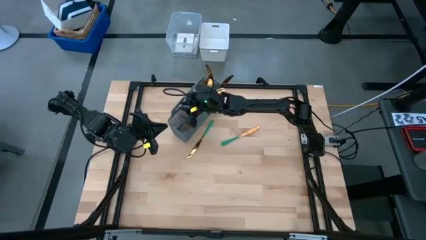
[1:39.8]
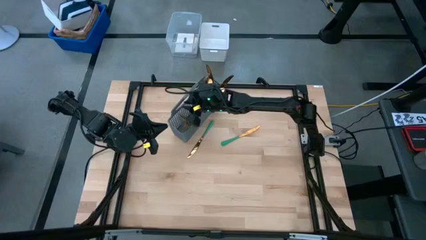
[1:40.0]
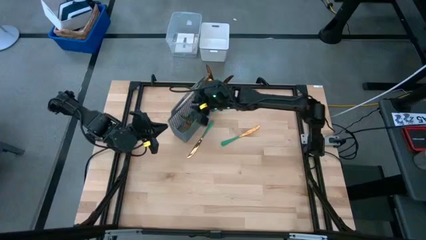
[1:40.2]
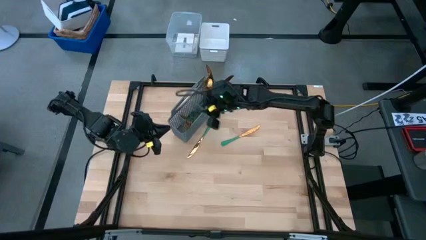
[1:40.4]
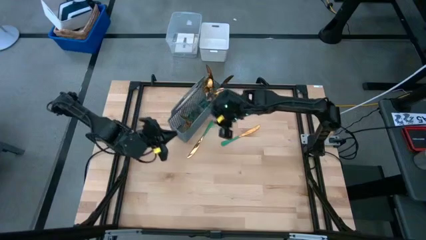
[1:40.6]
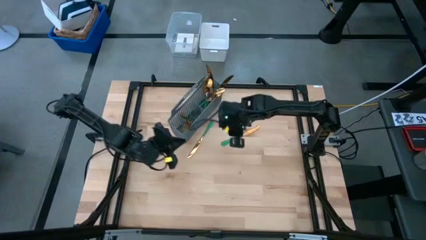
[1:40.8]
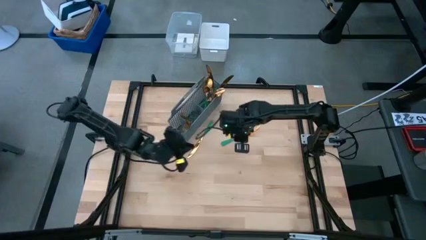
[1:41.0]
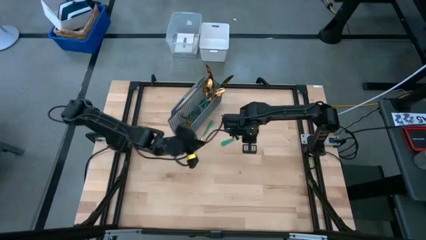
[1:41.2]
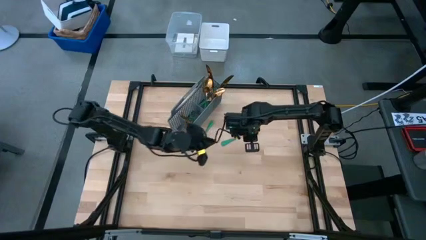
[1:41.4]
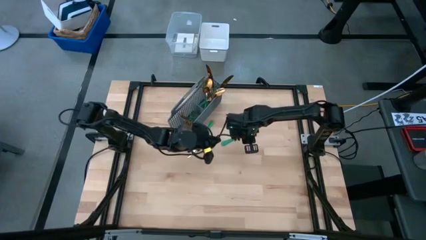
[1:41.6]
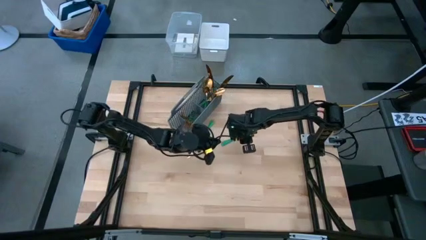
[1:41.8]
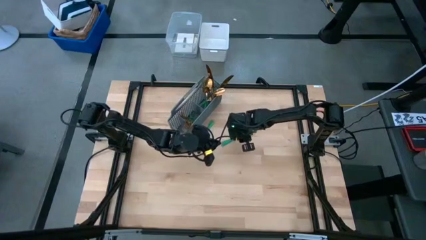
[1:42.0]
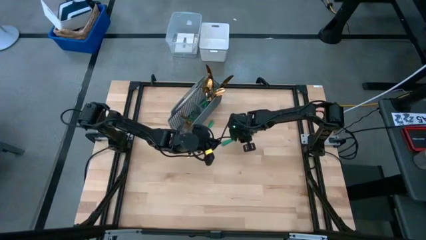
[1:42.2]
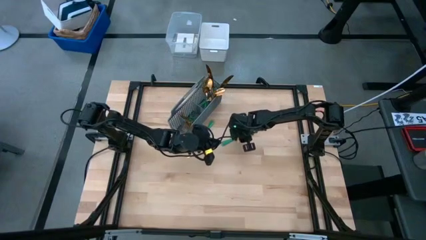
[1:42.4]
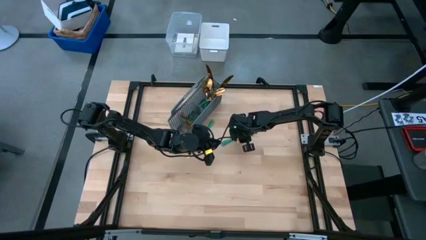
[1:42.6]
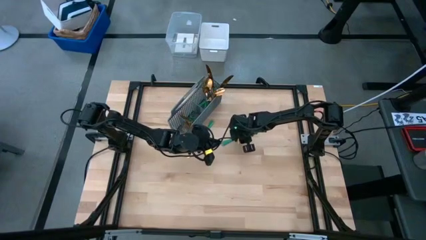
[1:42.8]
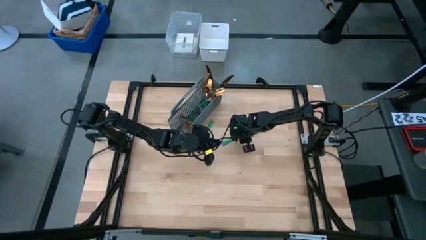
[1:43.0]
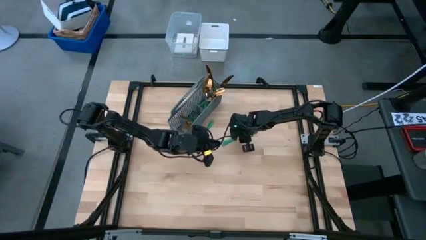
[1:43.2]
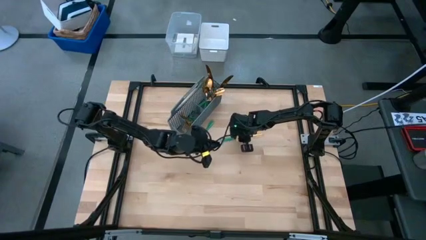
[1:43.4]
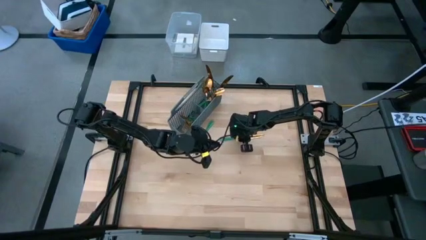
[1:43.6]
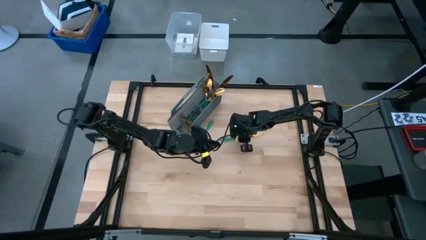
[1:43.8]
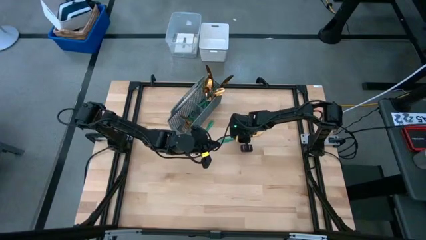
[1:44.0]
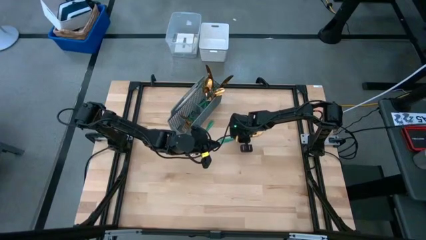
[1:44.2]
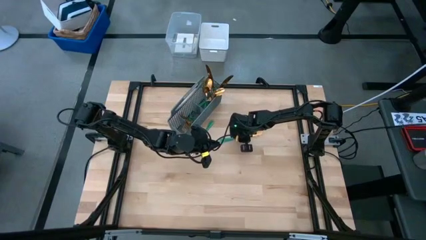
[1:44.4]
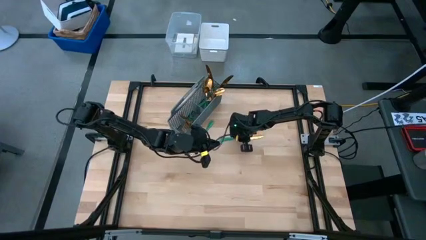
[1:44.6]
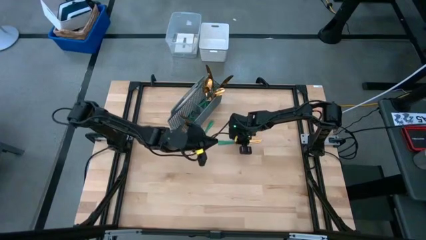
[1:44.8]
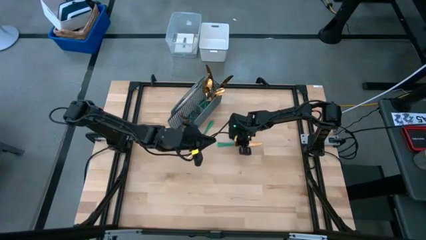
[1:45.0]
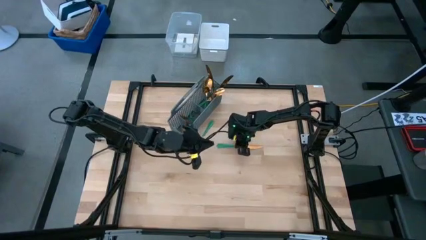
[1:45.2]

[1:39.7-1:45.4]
Task: Sort silverware
Put the right green-gold table knife into the silverware basket

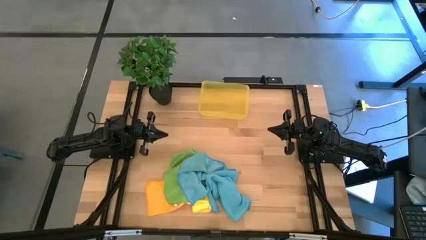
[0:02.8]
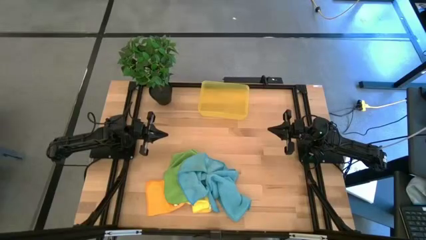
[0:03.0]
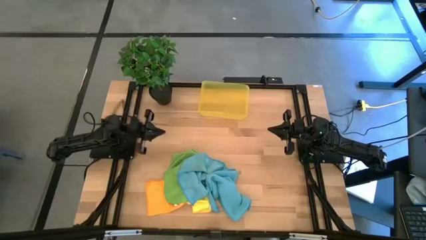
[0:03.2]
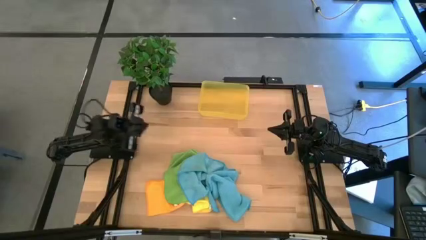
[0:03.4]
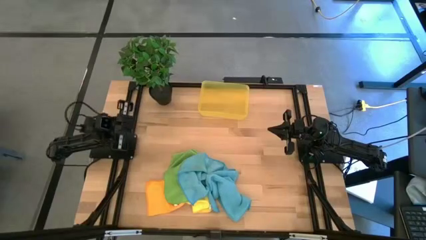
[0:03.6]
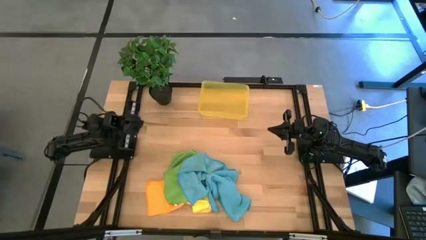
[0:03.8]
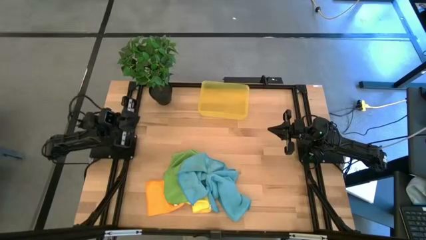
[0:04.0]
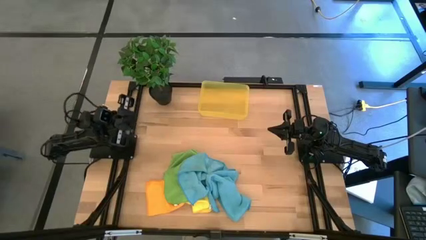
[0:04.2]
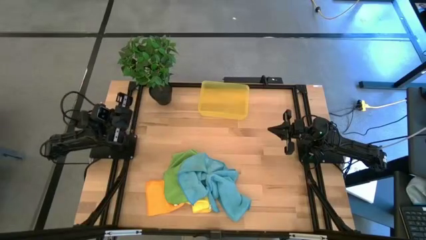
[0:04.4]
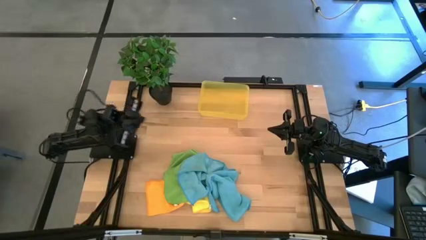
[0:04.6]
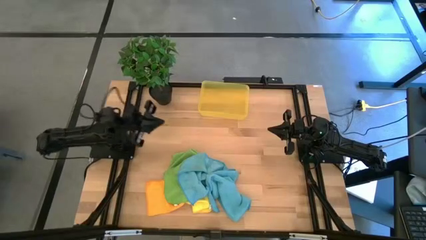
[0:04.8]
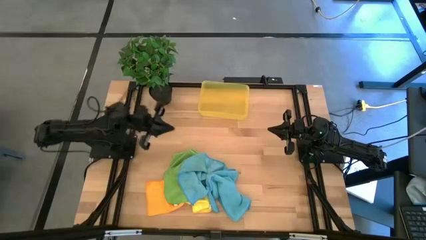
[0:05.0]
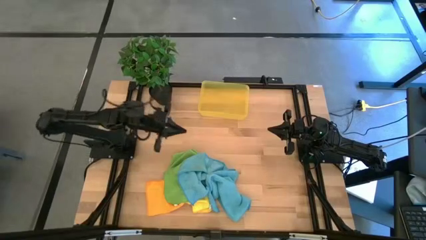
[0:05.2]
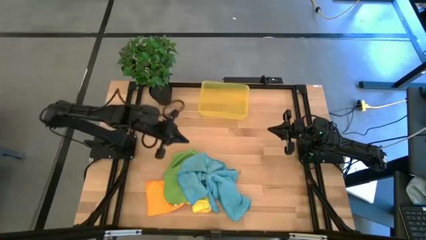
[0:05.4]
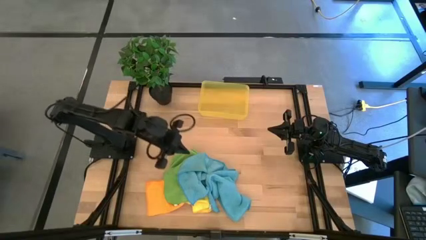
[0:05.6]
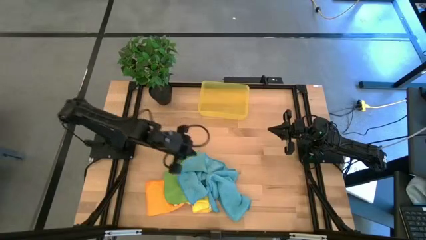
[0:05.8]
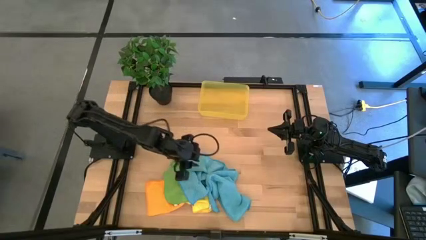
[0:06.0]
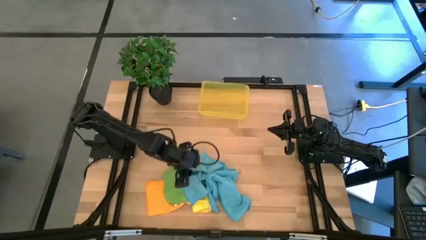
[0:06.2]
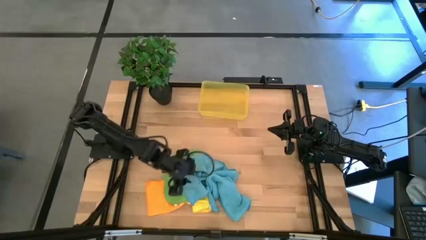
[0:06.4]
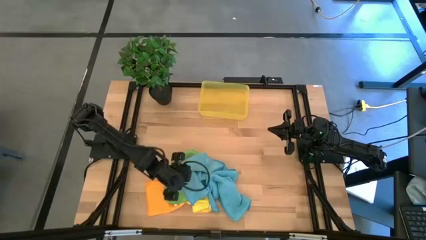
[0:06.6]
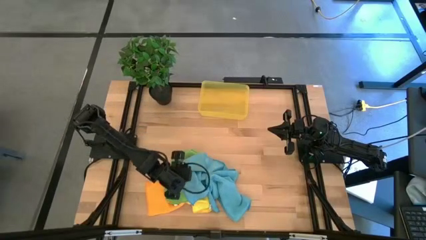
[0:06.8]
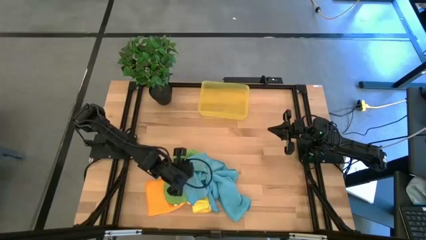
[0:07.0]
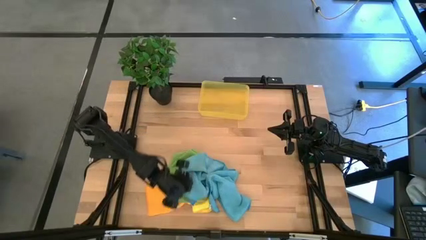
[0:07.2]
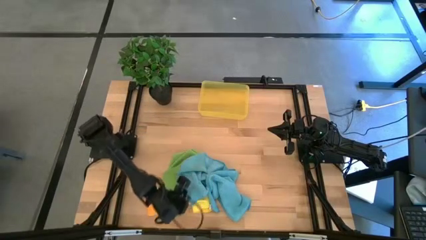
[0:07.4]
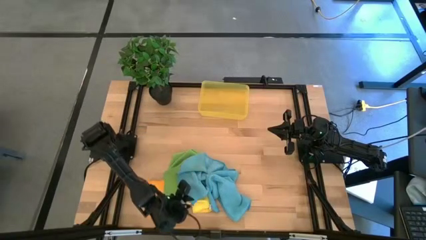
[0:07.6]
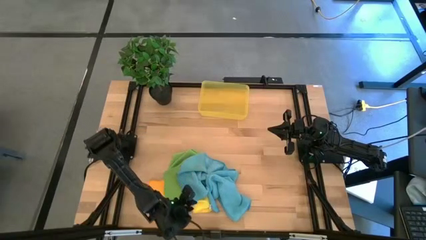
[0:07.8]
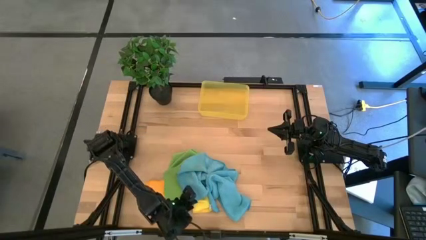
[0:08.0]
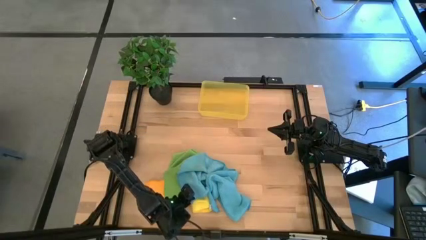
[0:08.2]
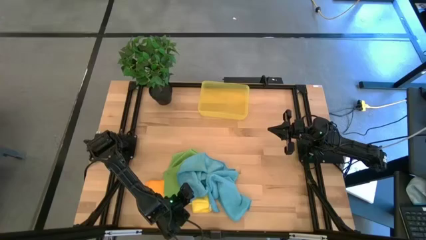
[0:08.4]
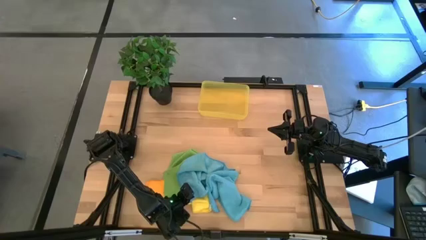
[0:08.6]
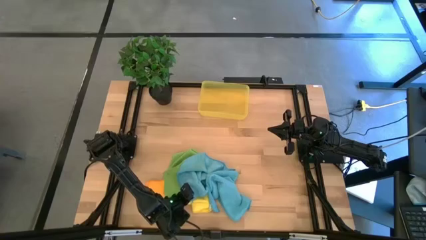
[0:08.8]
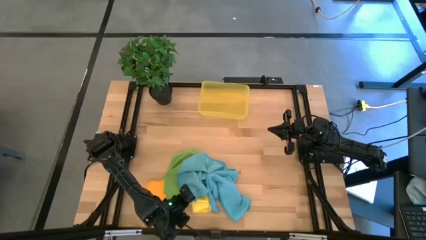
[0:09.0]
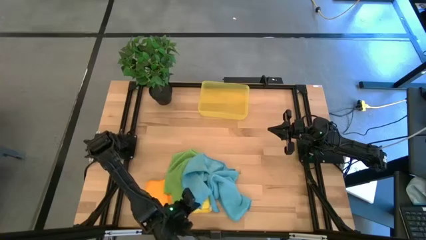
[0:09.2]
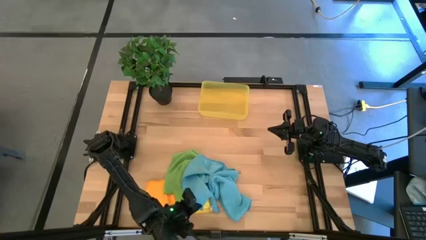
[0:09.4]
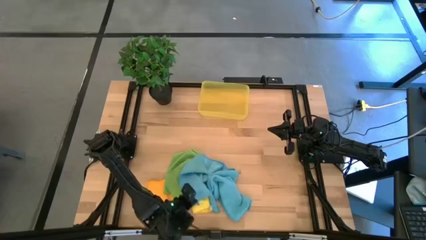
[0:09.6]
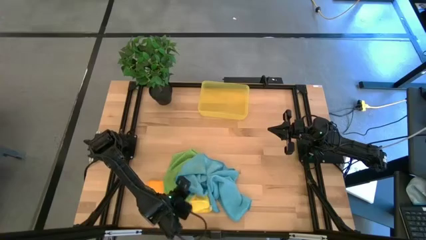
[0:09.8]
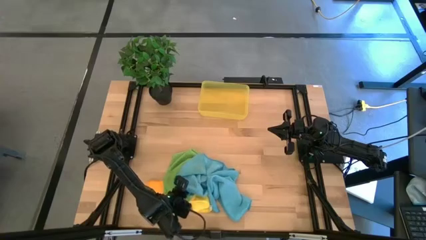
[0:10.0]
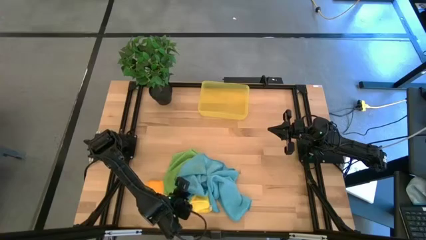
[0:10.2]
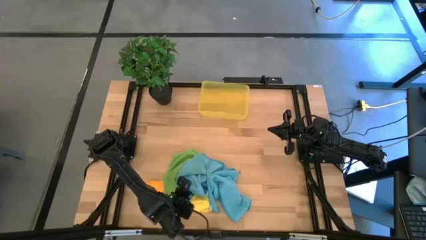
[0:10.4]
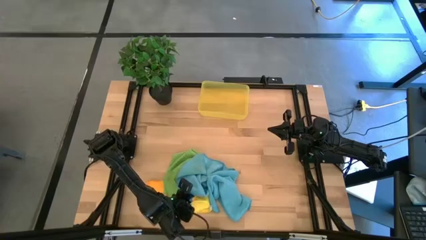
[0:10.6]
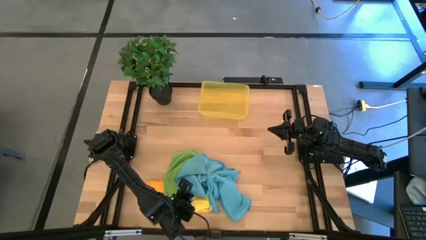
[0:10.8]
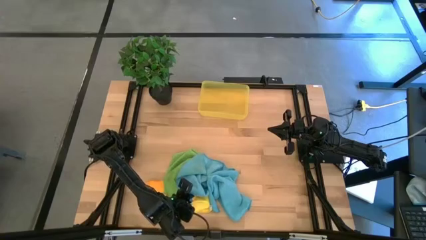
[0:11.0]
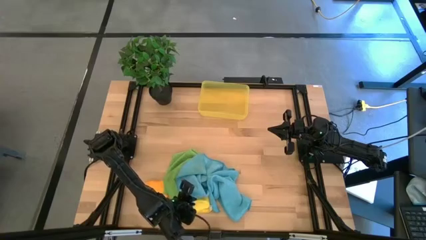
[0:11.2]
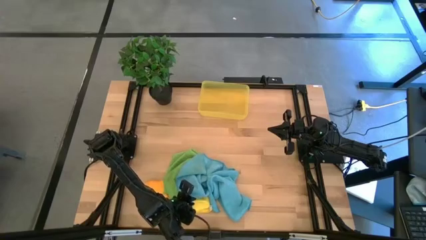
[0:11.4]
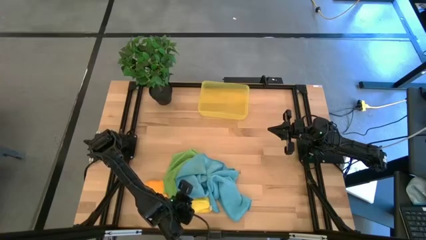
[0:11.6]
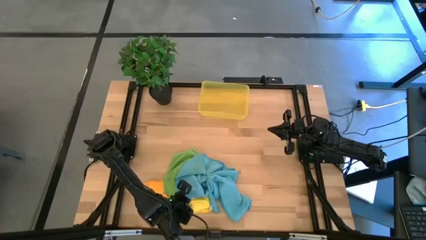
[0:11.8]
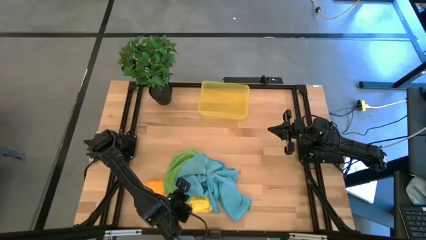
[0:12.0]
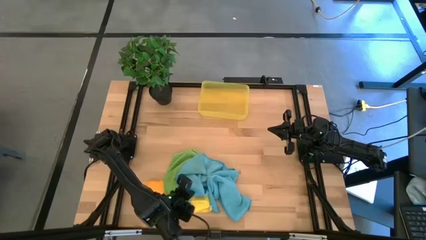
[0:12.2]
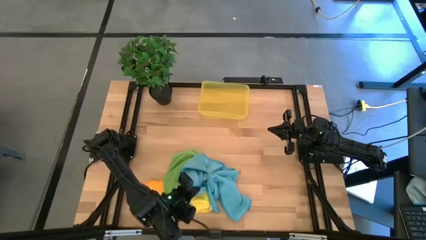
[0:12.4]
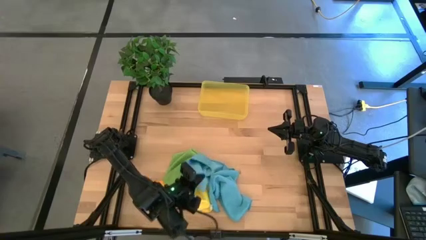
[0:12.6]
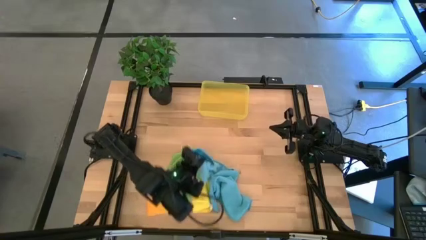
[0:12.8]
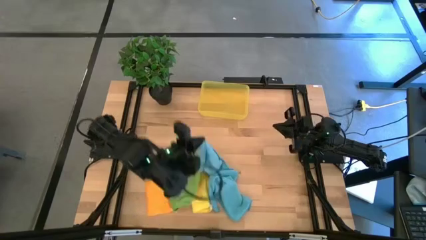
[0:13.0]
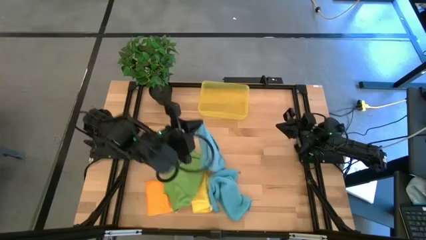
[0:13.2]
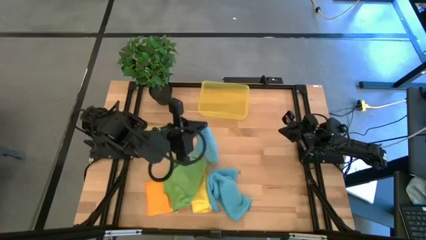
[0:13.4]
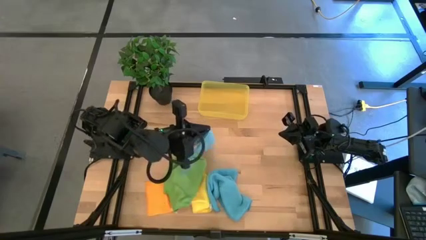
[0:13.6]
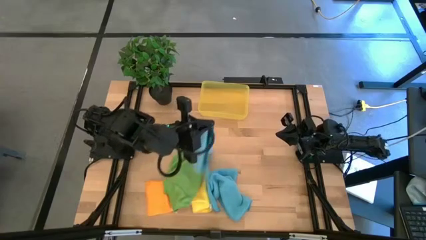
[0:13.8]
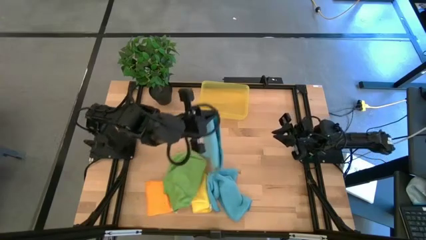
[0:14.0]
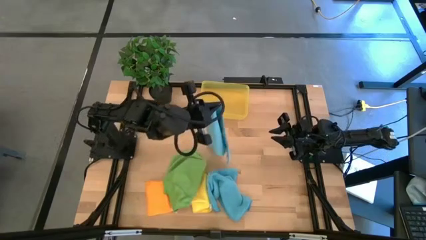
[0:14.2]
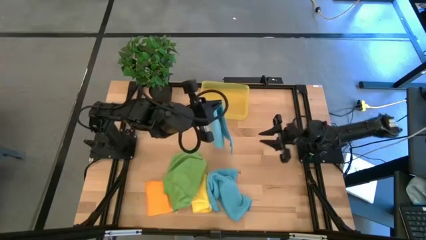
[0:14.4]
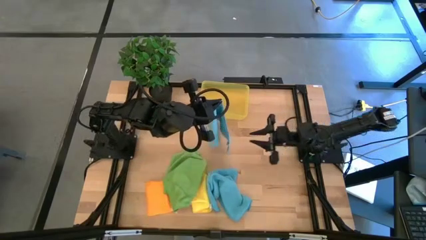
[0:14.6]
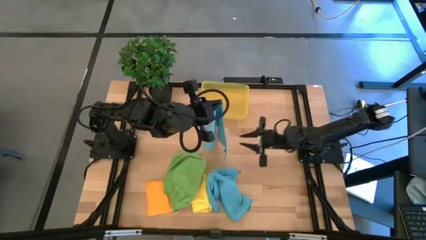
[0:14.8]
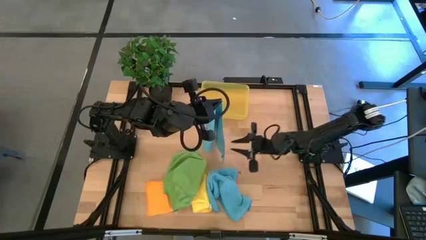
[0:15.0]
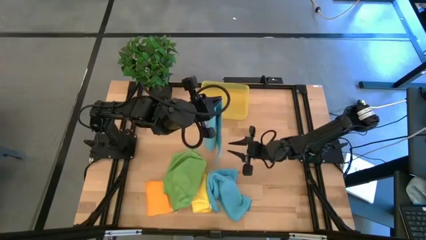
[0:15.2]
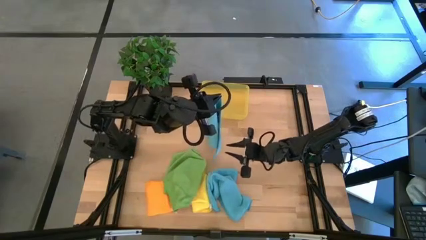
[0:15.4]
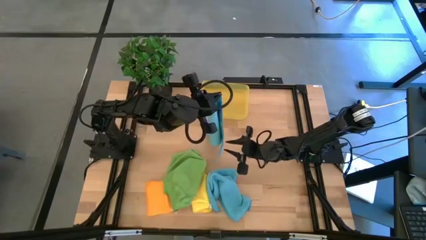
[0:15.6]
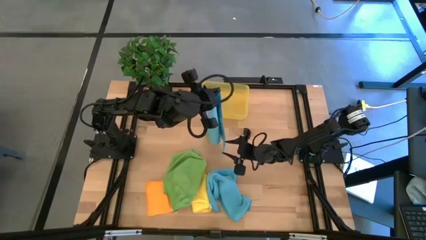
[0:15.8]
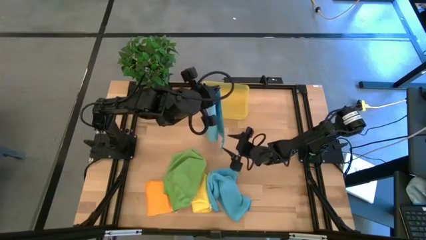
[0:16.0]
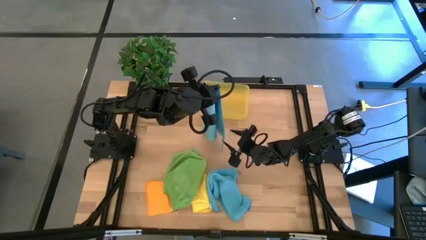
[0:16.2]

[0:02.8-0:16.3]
Task: Fold microfiber towels
Fold the left blue microfiber towel
